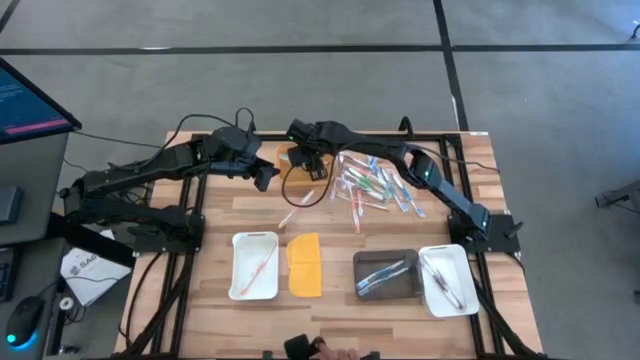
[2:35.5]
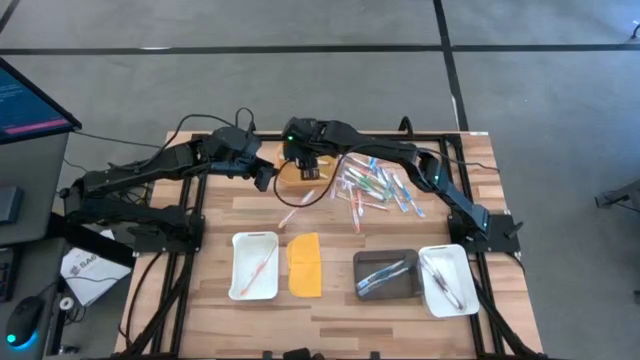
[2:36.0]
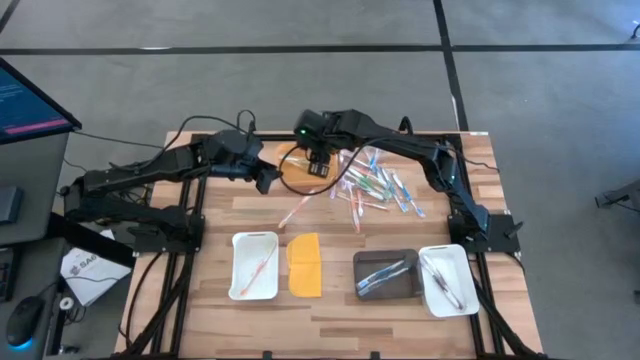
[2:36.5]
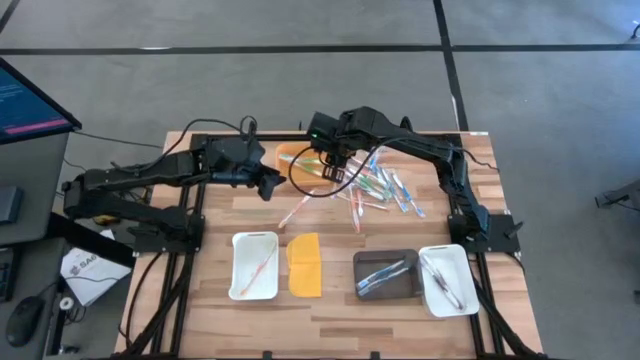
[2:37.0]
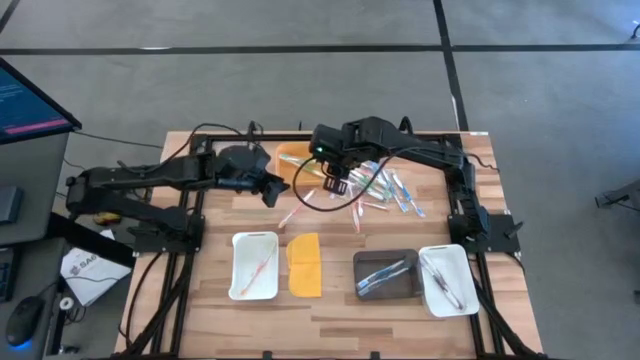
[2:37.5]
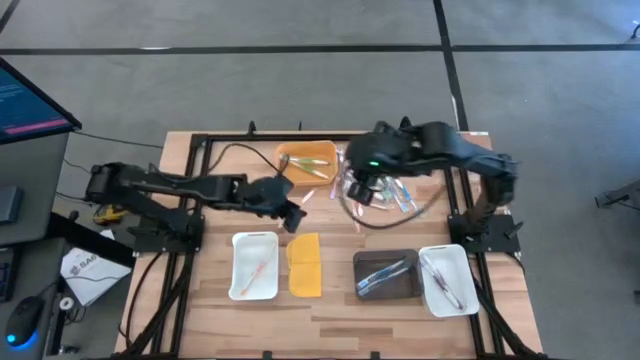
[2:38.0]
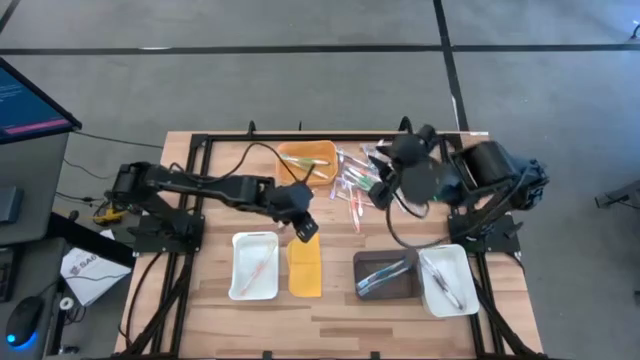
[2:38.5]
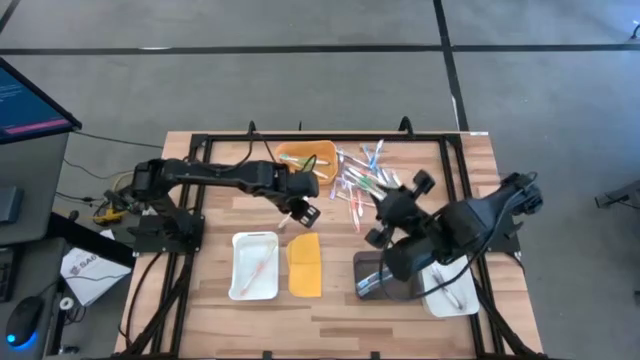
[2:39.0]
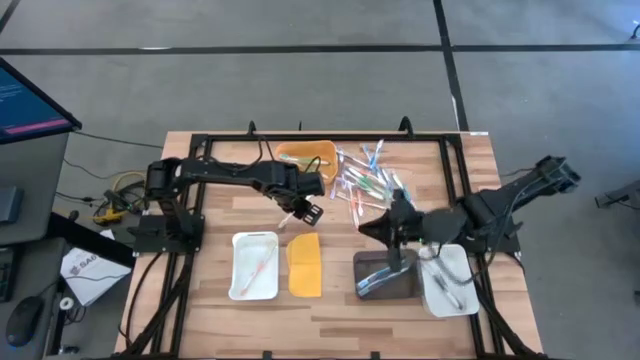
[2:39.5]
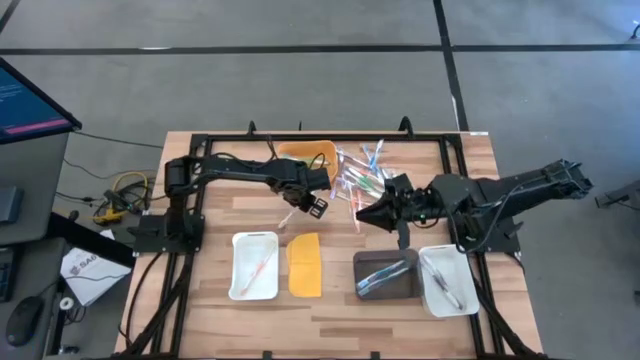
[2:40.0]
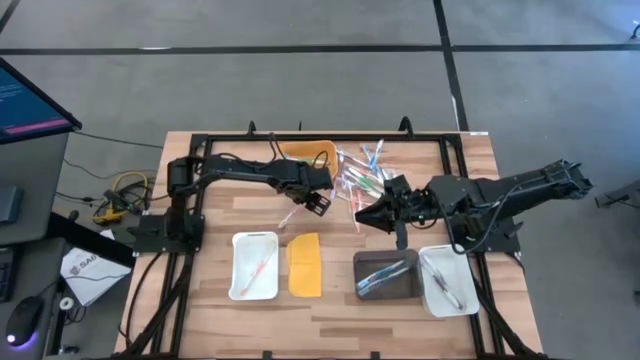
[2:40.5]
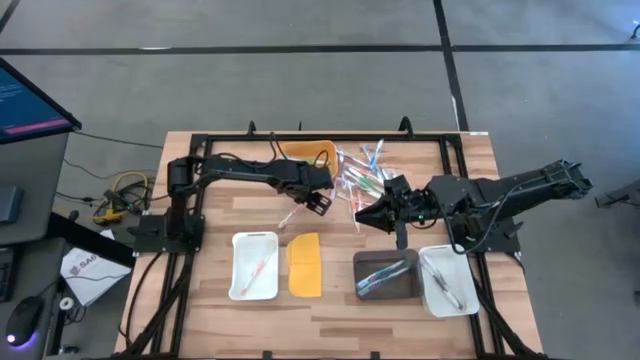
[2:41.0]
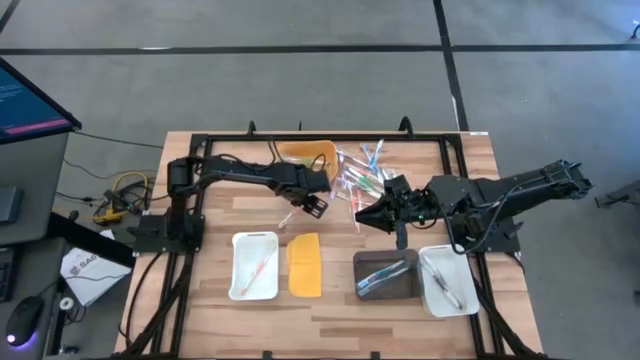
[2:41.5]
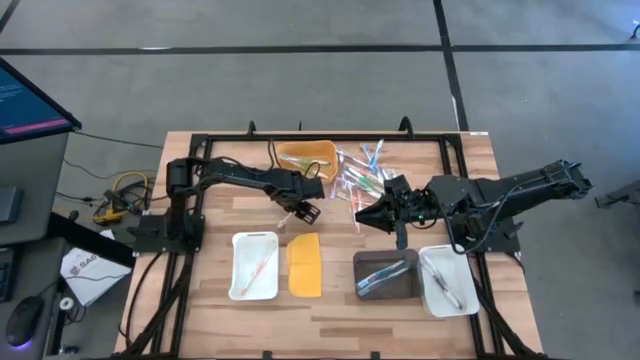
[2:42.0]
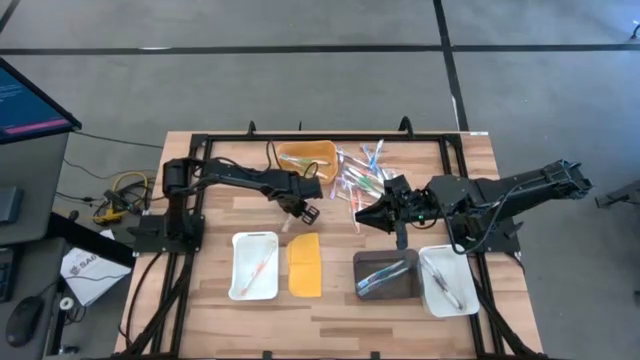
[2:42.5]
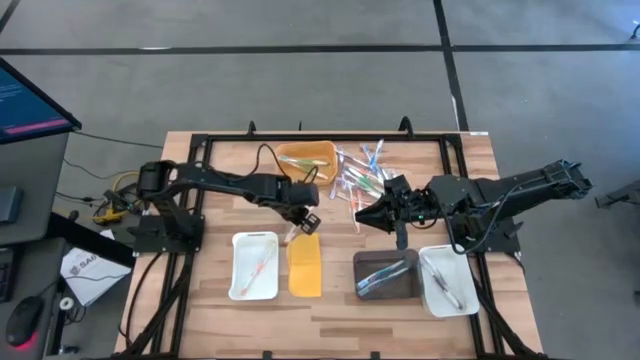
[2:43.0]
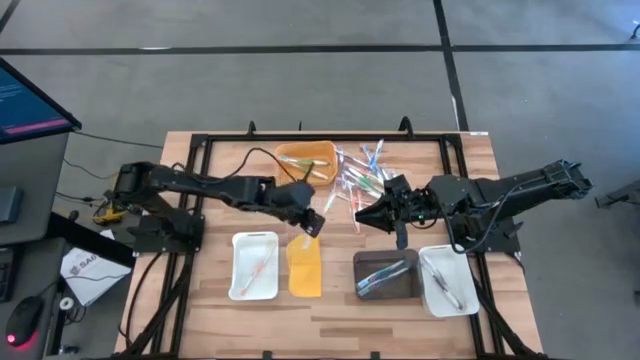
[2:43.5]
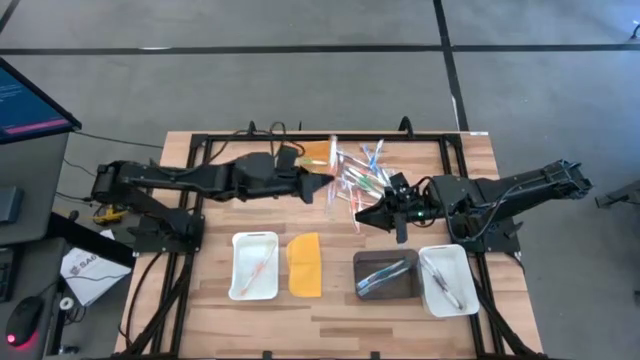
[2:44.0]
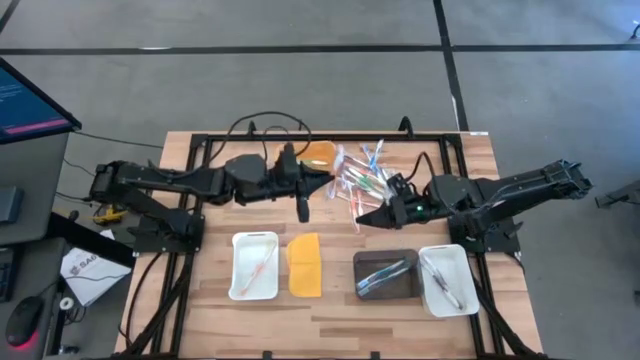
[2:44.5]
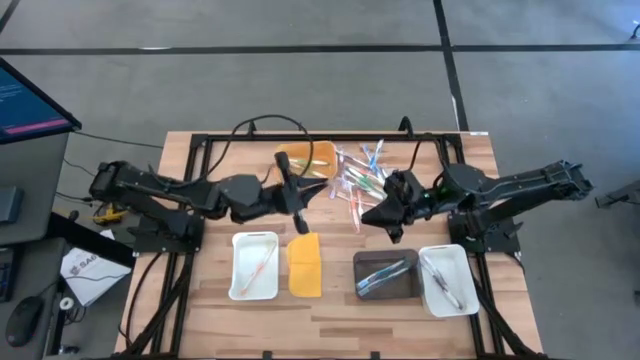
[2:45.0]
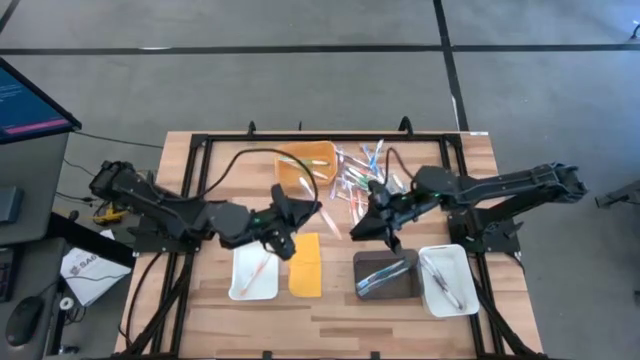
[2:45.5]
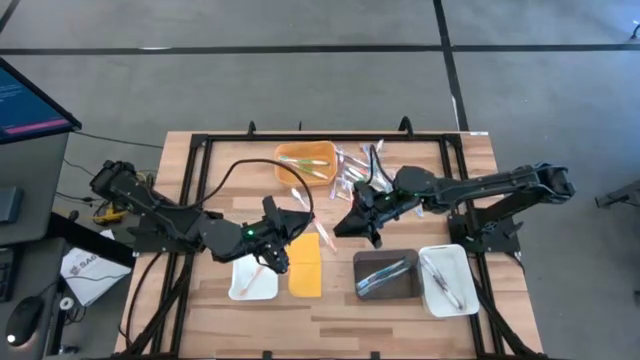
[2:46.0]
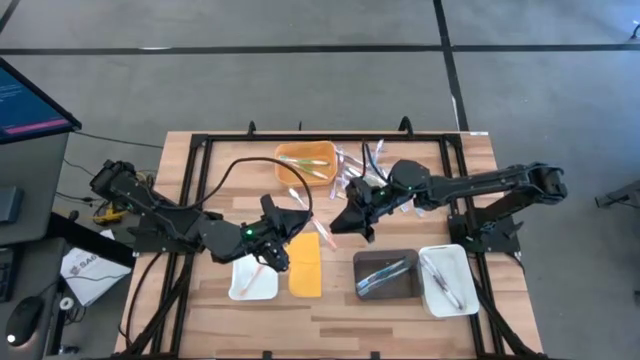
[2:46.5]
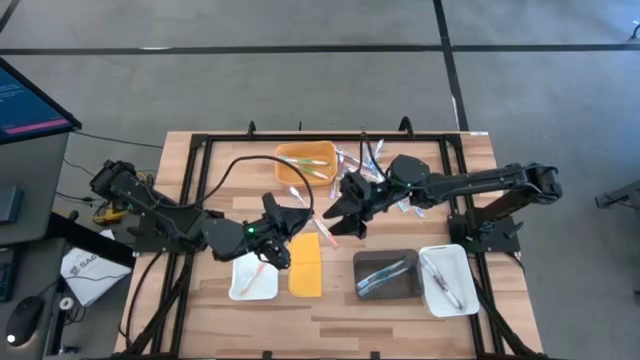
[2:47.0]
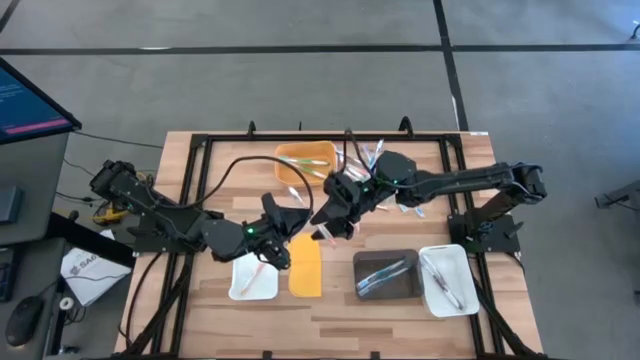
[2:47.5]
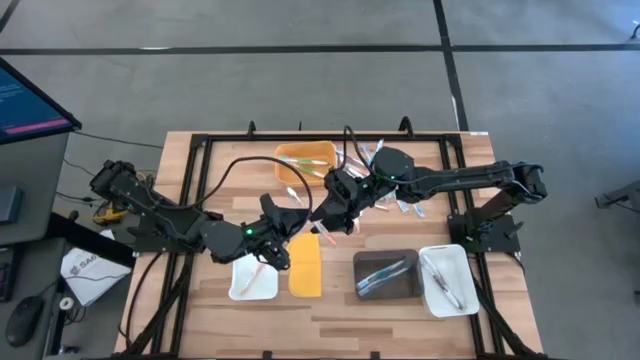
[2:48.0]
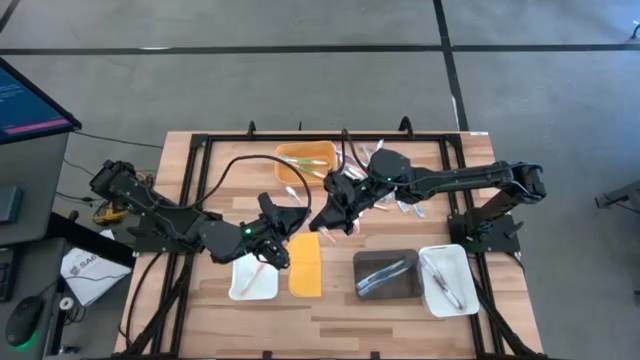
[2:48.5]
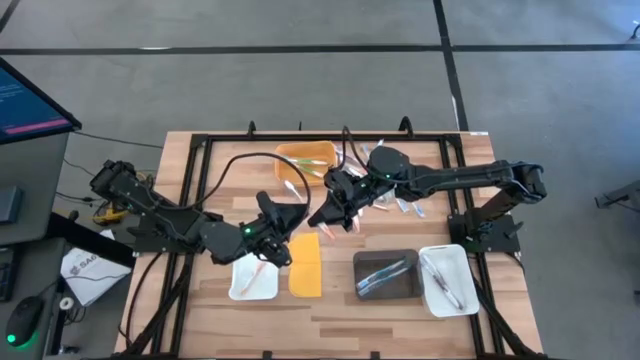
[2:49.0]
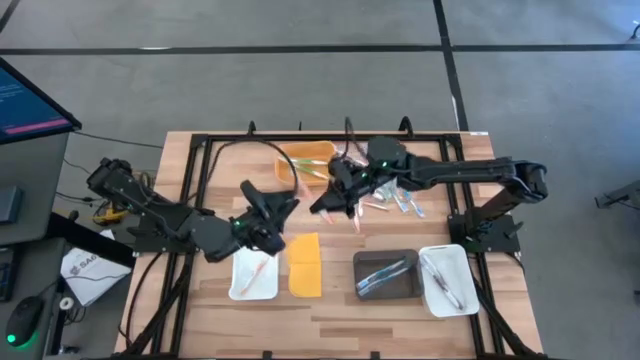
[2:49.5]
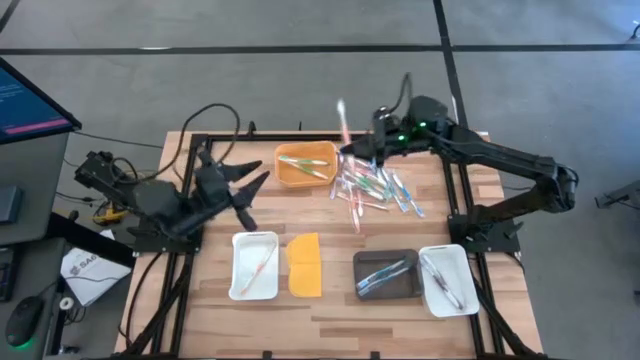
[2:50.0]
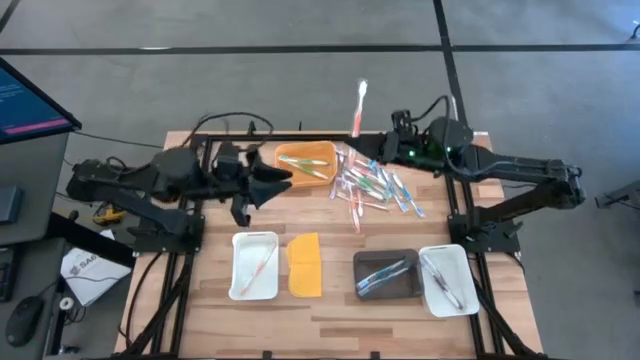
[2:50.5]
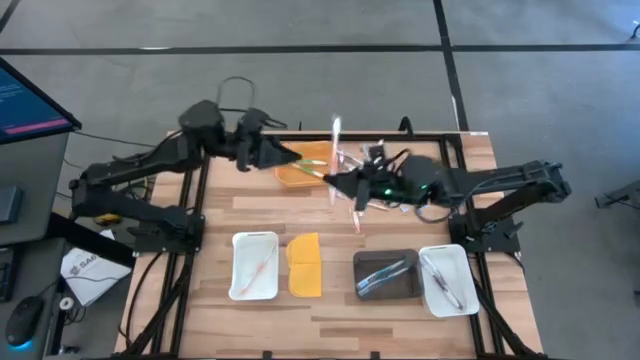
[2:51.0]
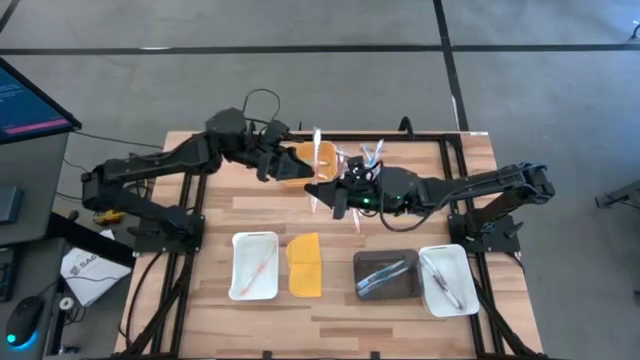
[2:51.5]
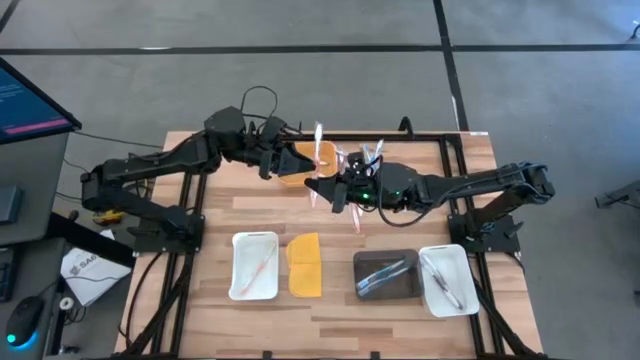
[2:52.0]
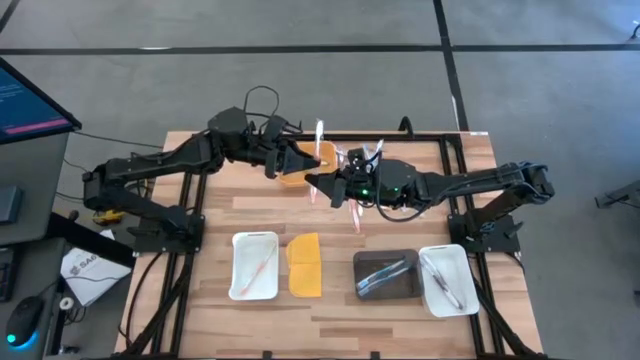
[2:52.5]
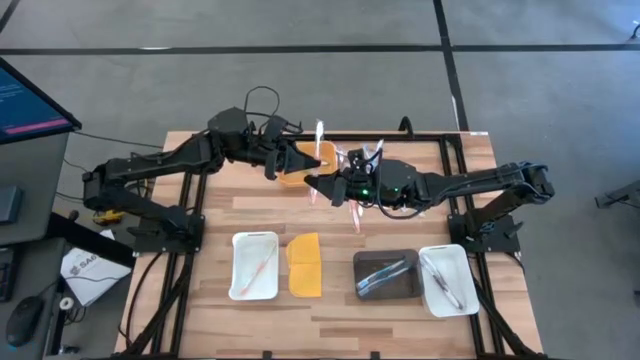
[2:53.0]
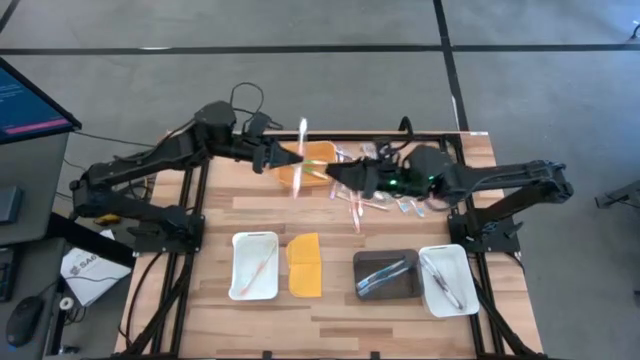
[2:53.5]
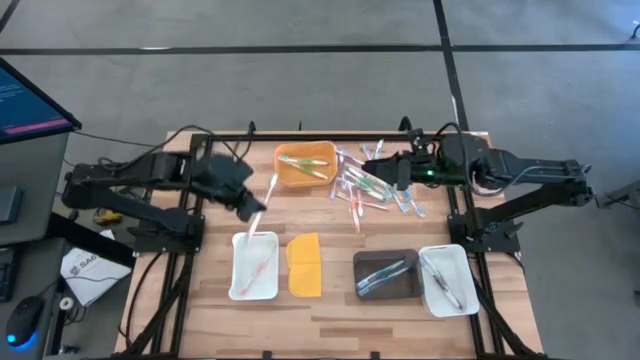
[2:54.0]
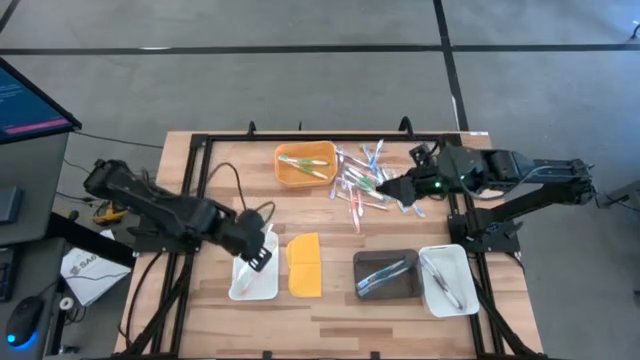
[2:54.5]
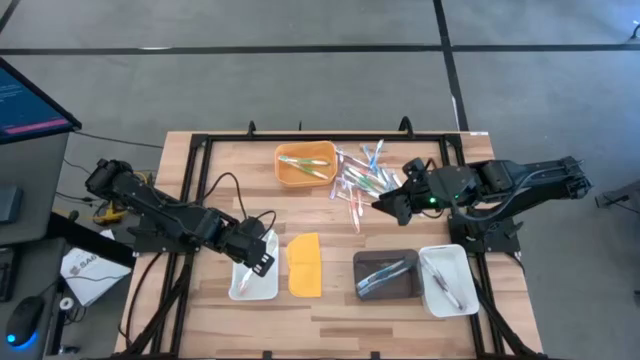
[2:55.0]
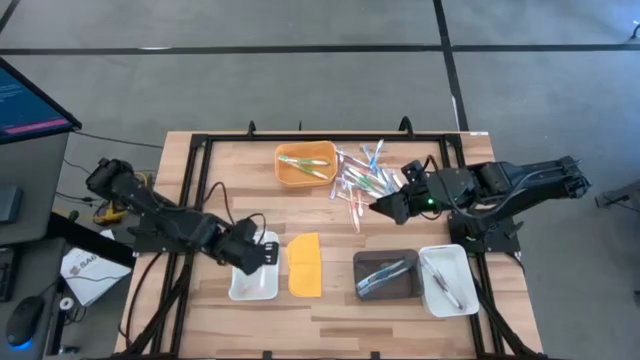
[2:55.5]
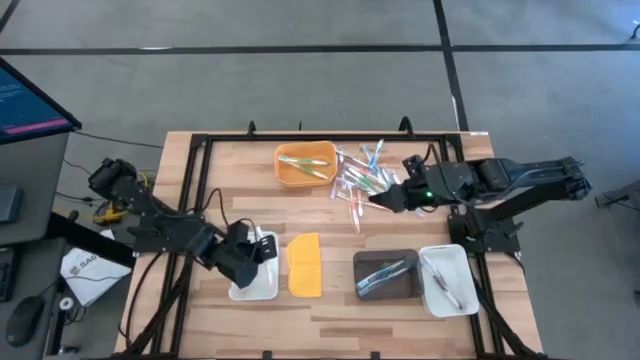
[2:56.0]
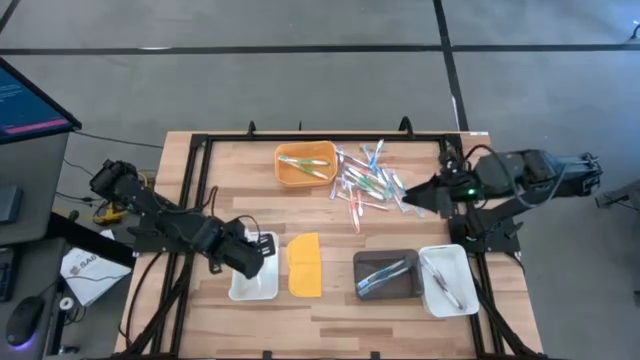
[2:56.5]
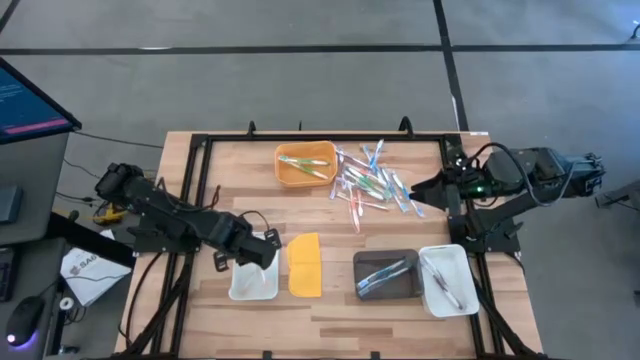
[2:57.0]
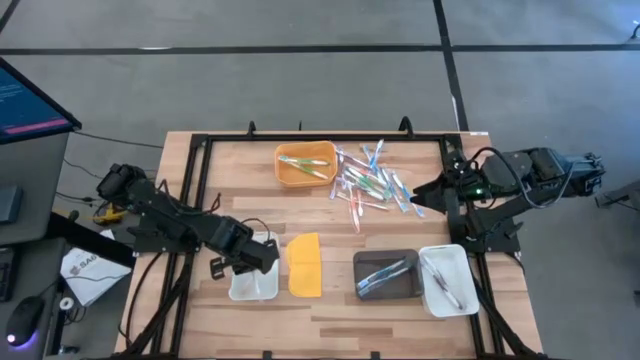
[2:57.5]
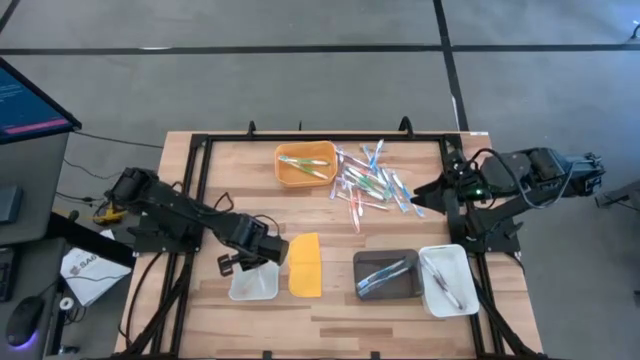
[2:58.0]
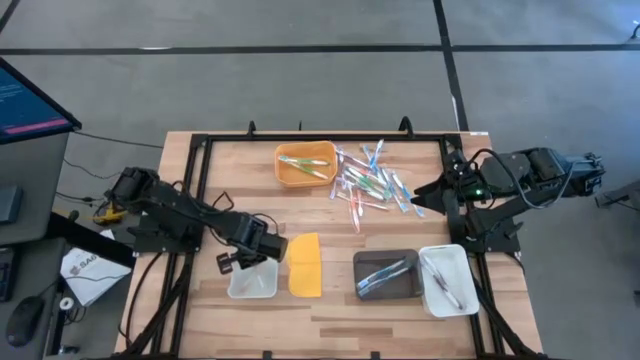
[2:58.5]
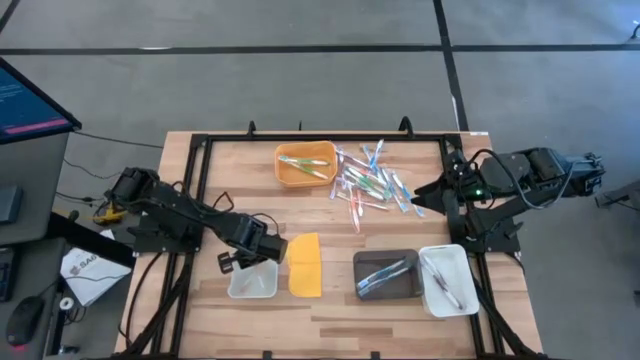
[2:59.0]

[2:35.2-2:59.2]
Task: Pick & Place Toothbrushes
Put the orange toothbrush into the left white bin
